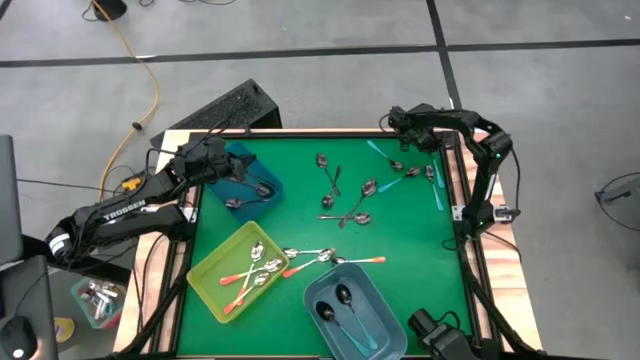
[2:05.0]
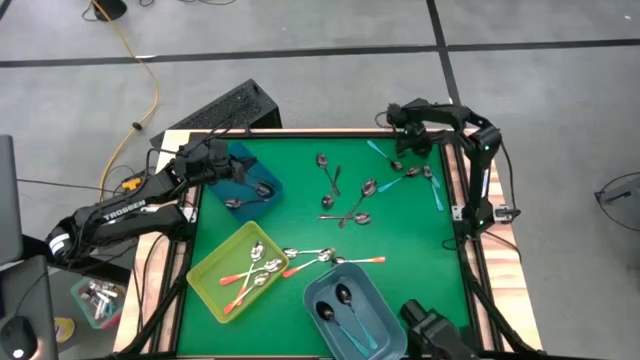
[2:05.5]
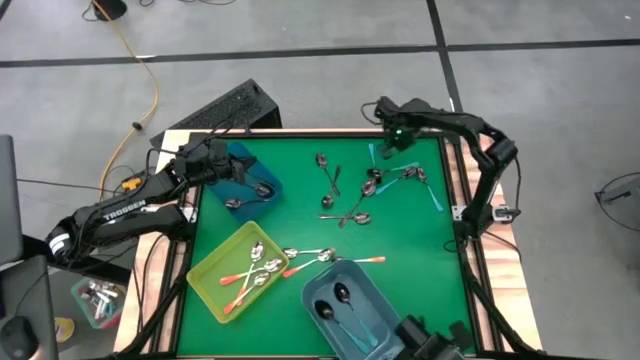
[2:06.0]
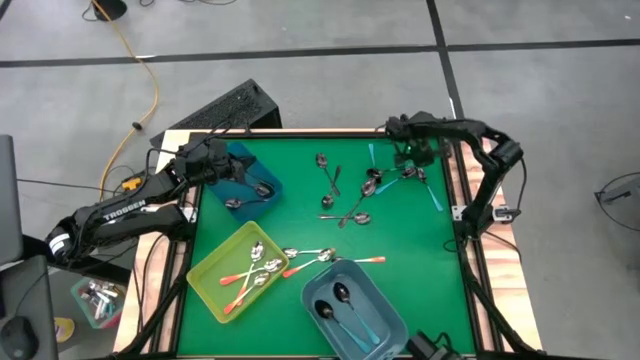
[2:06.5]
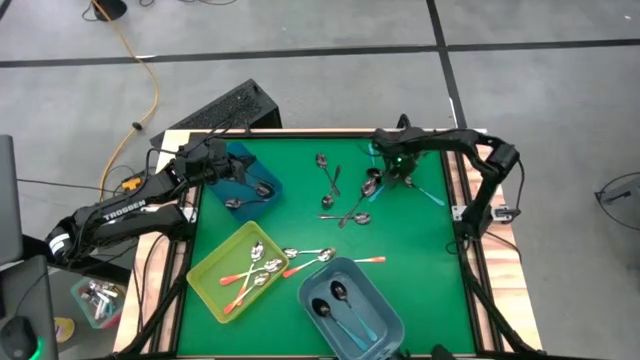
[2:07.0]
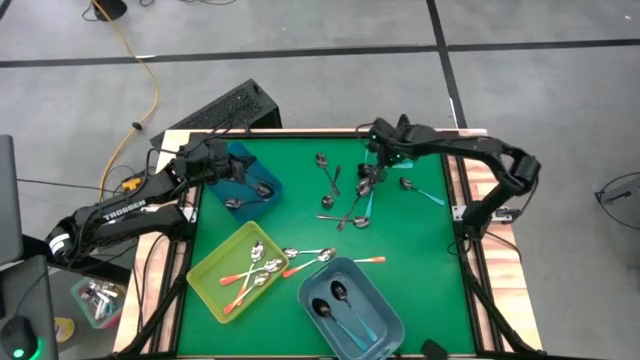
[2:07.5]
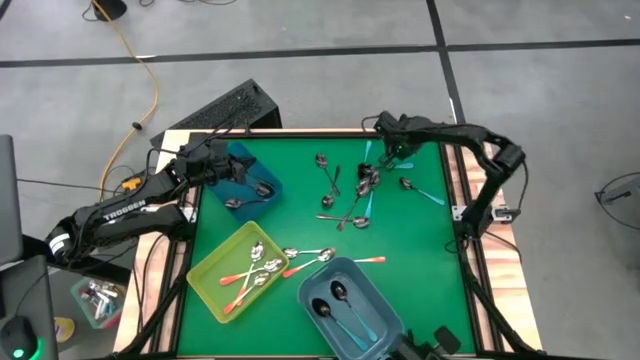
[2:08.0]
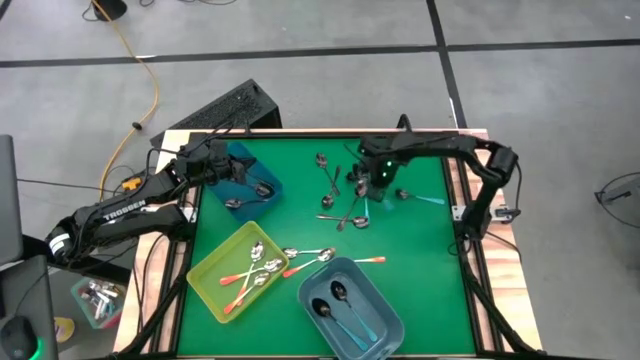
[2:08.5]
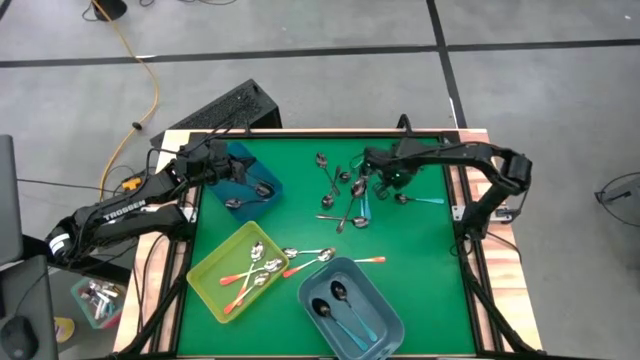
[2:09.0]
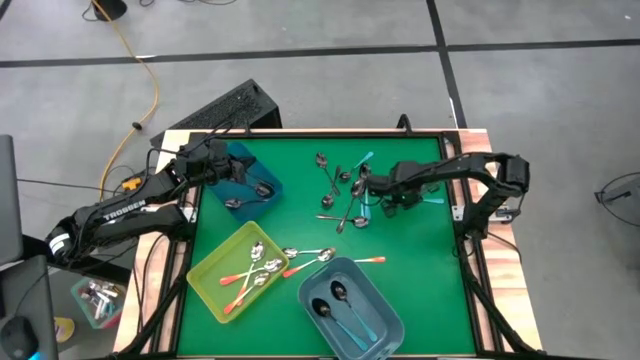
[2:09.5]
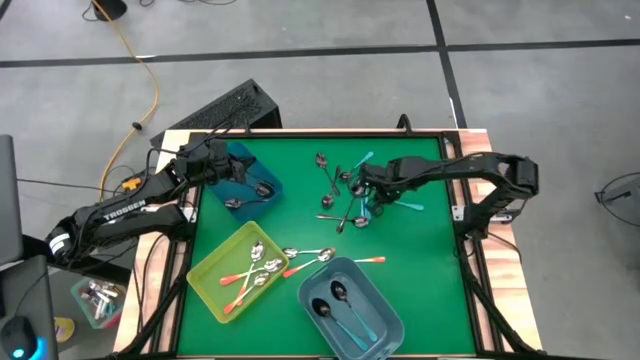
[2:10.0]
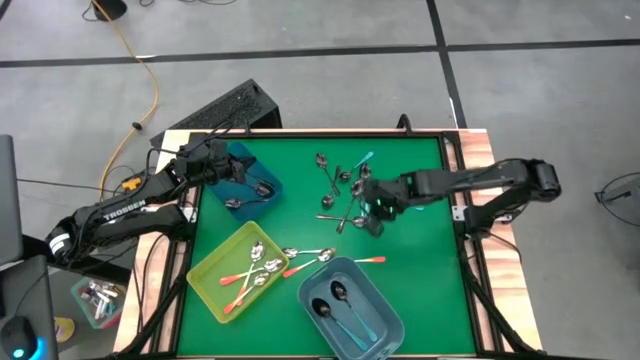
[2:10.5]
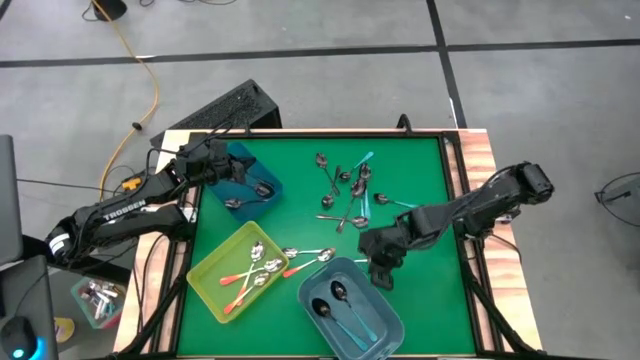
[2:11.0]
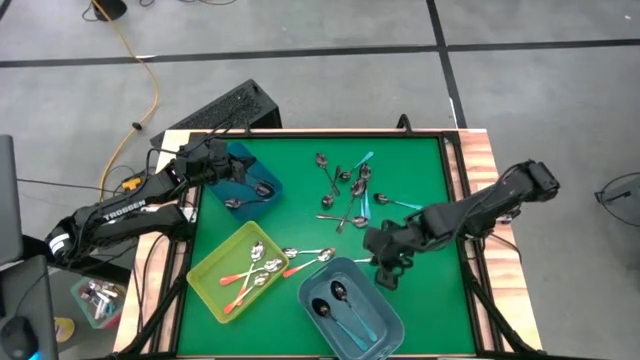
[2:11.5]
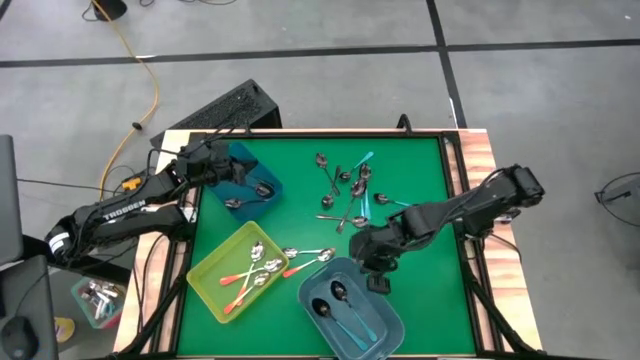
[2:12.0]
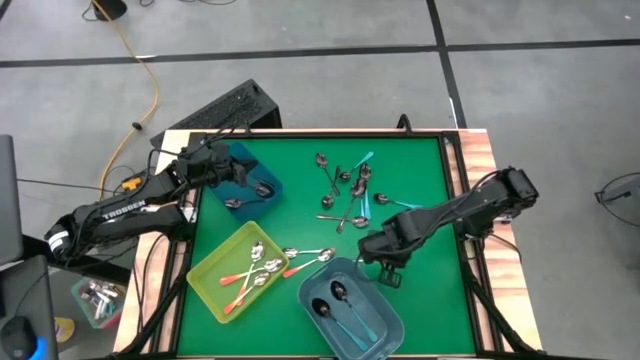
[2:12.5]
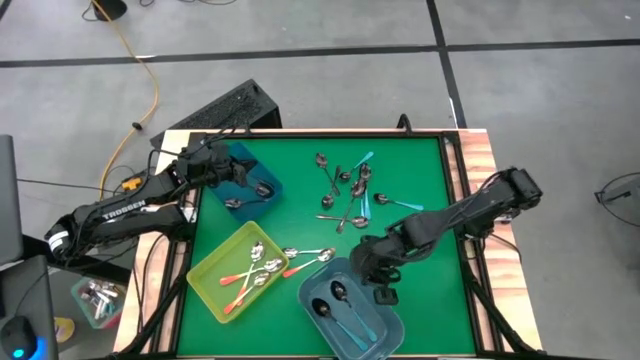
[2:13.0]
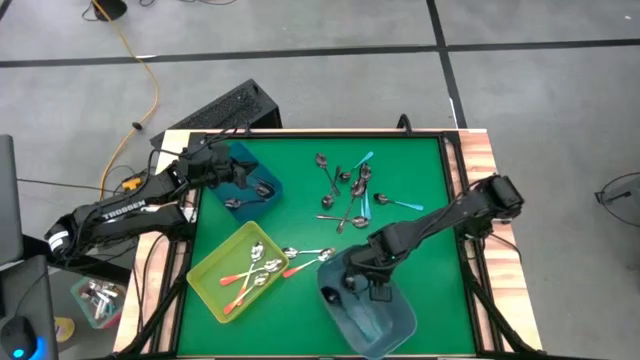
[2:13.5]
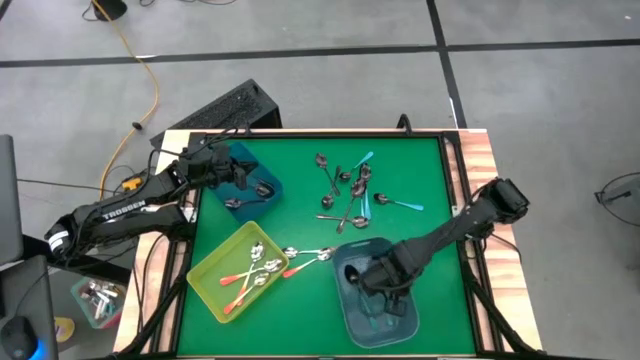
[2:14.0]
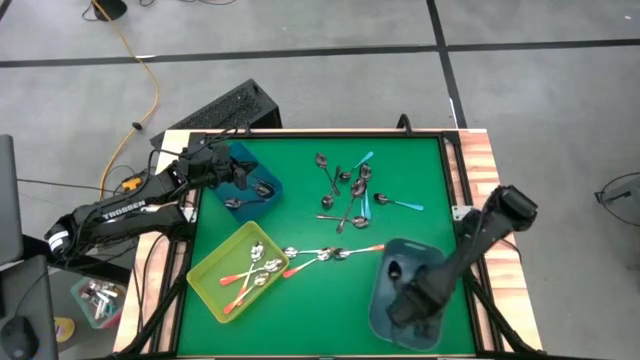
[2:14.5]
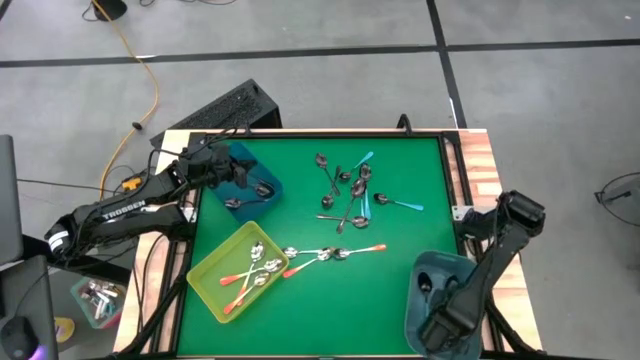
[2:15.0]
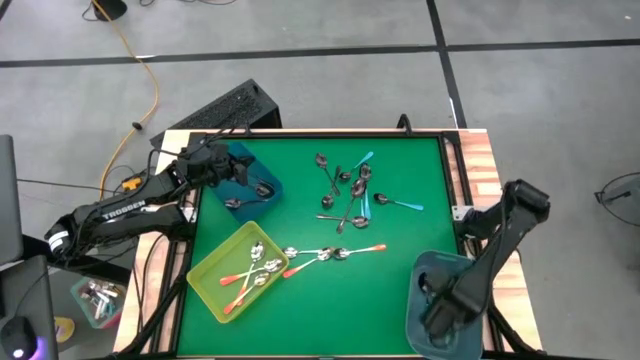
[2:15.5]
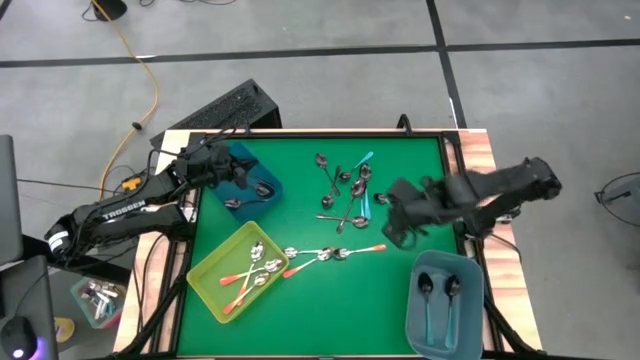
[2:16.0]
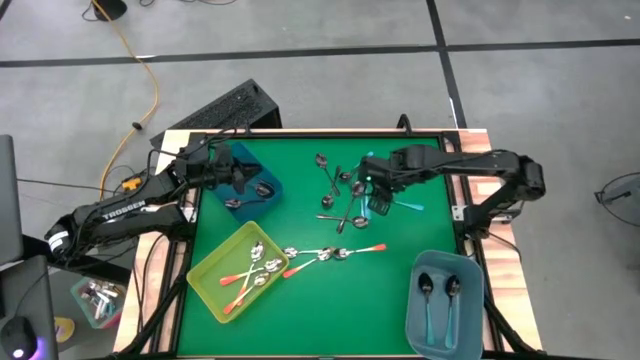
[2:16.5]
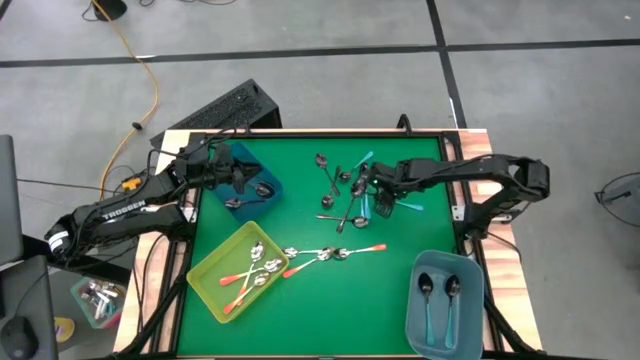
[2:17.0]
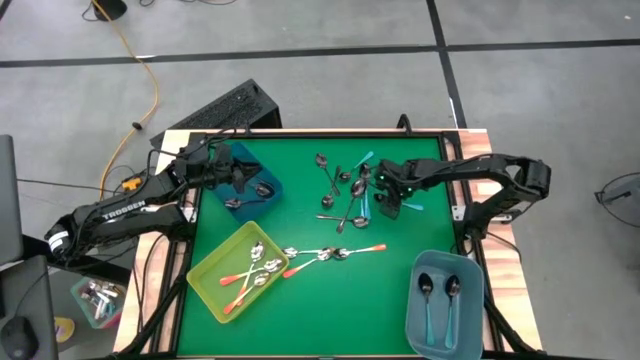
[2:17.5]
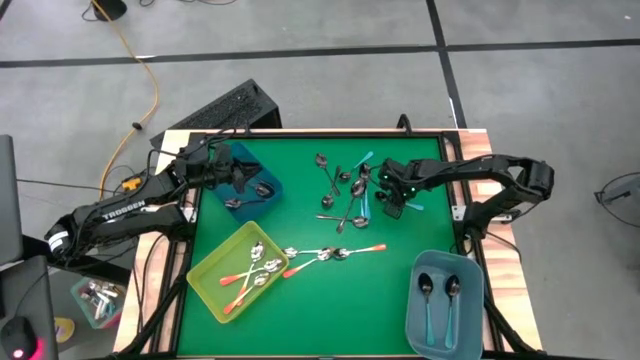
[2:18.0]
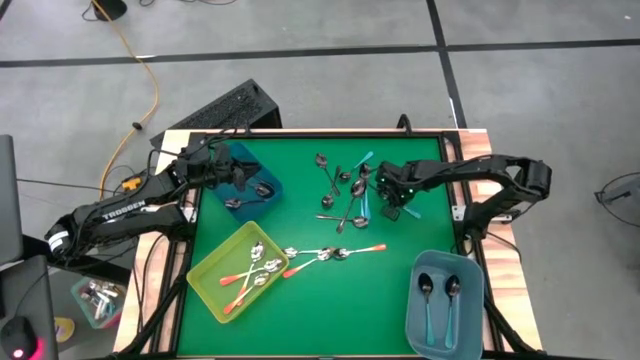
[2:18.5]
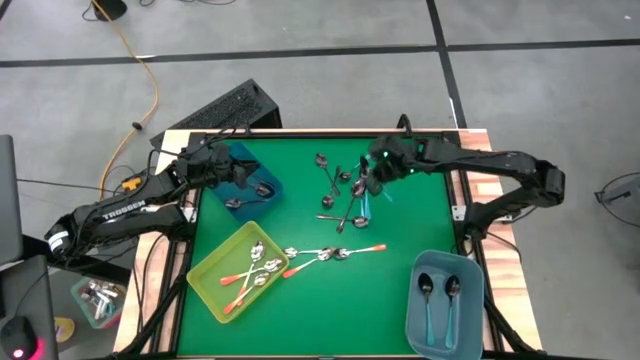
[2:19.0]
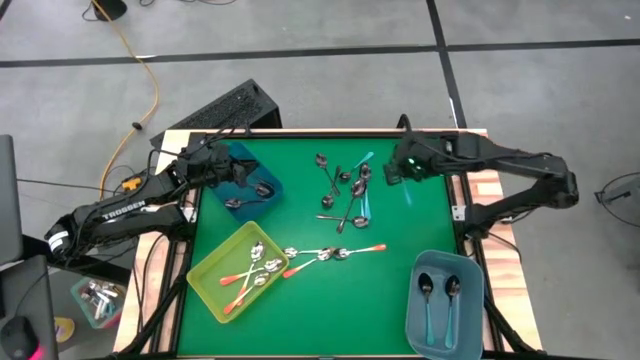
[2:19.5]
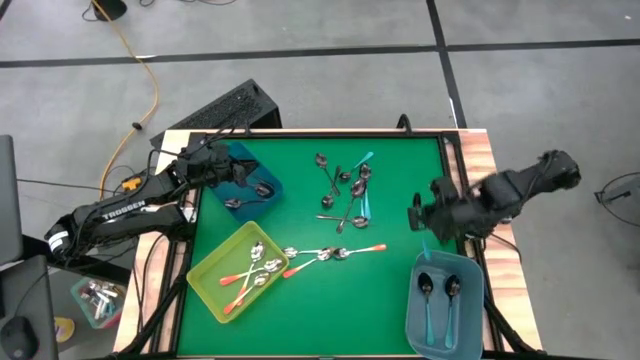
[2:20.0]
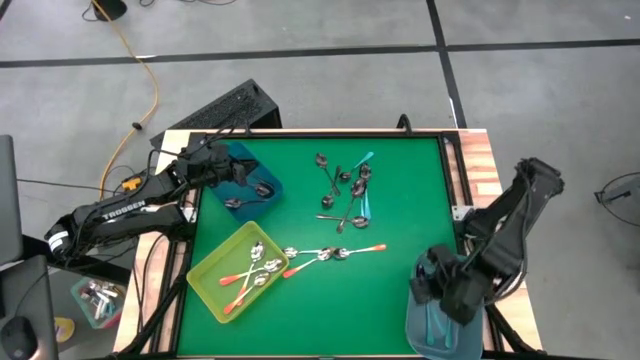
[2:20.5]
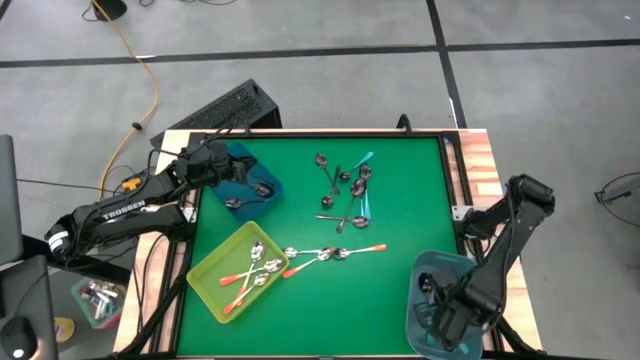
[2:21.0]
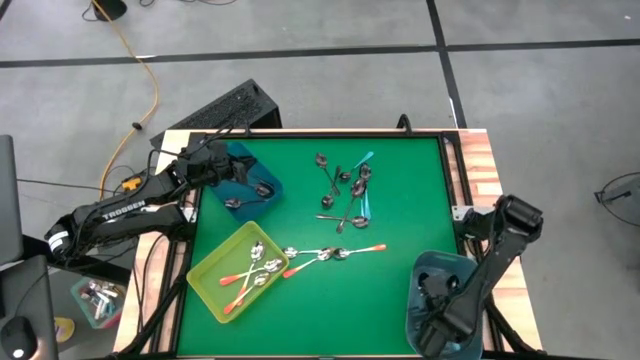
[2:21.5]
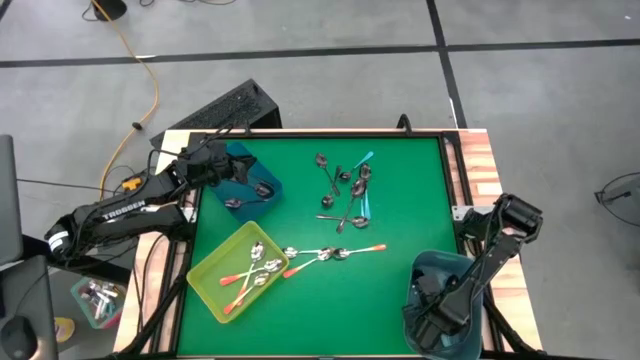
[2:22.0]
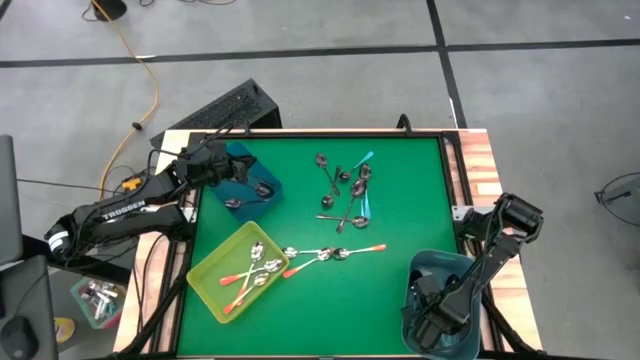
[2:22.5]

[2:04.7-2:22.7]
Task: Sort silverware by color (type)
Put the blue spoon into the blue bin

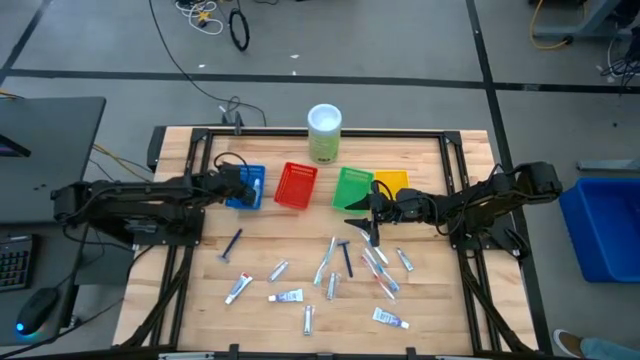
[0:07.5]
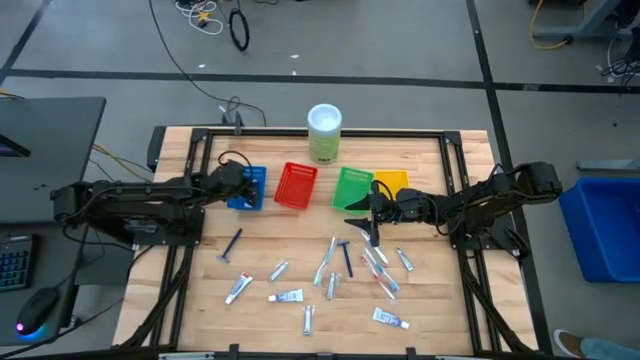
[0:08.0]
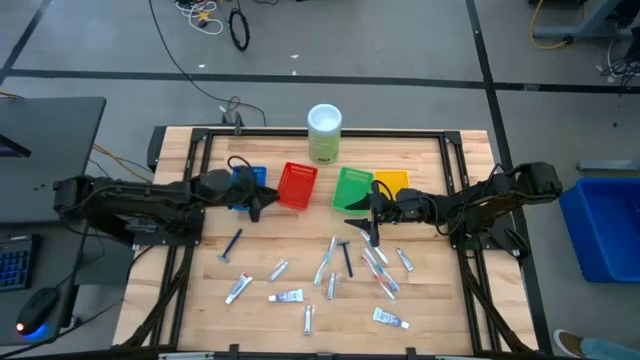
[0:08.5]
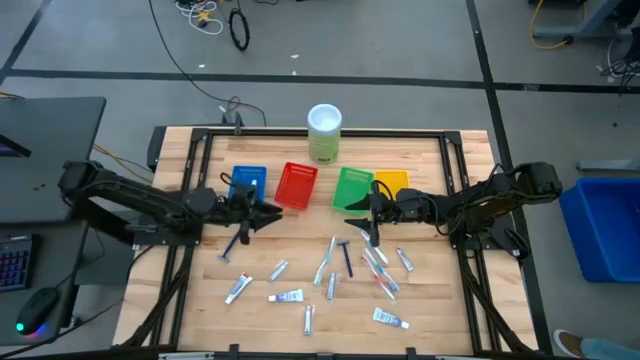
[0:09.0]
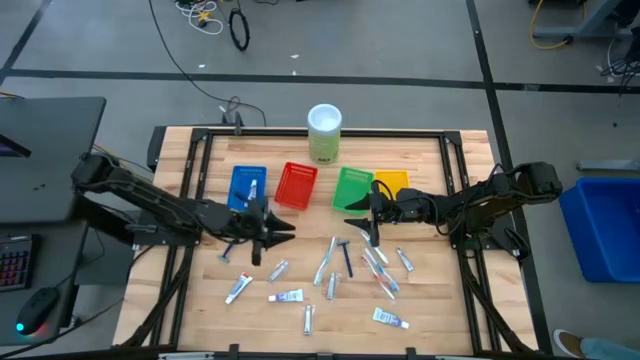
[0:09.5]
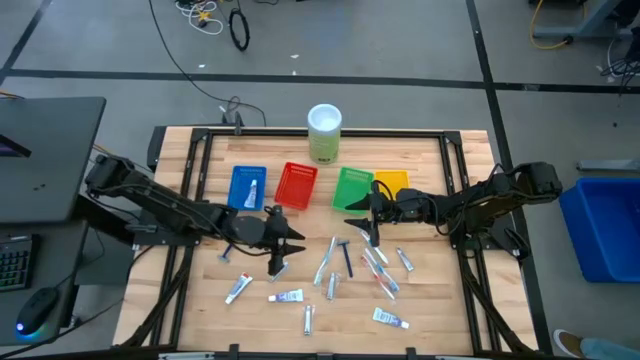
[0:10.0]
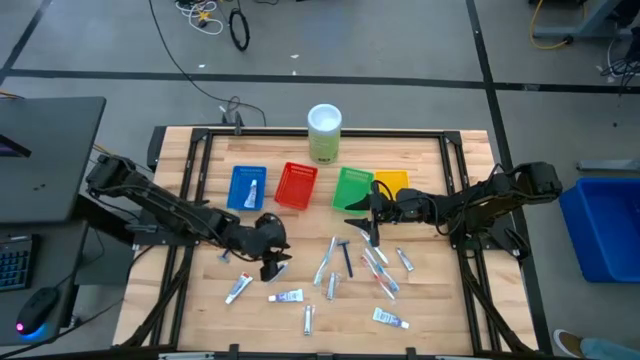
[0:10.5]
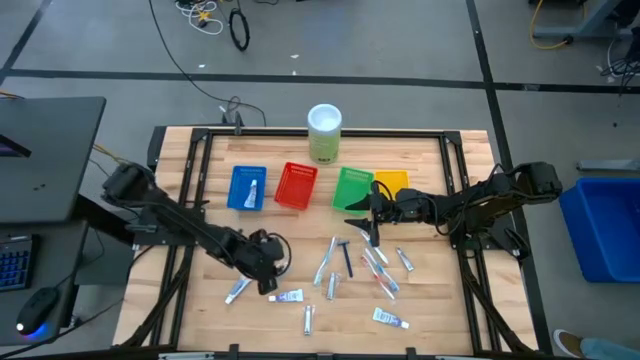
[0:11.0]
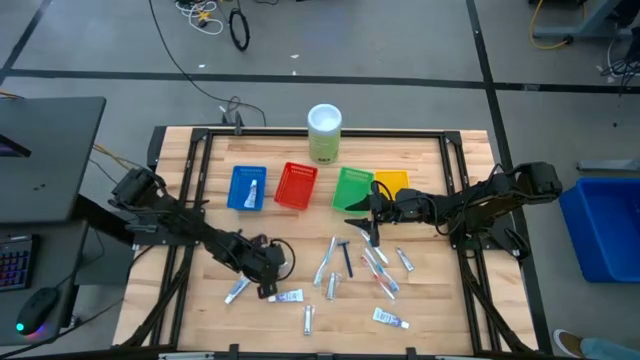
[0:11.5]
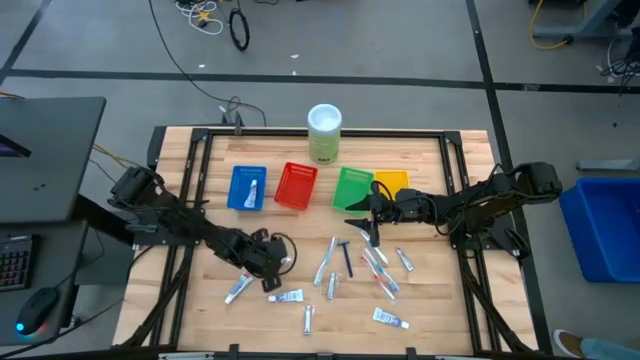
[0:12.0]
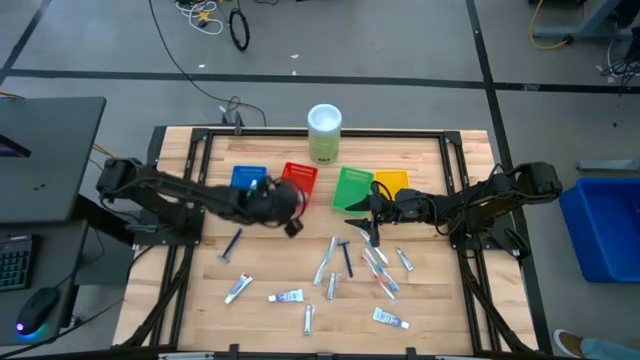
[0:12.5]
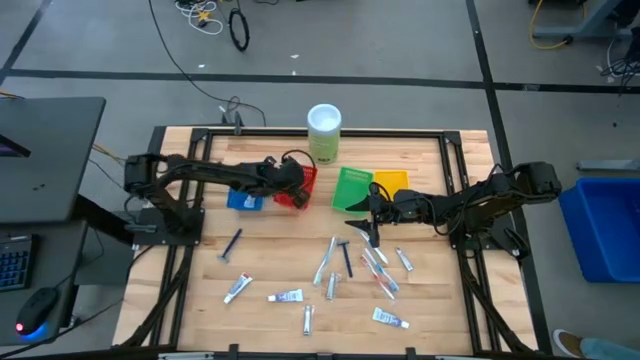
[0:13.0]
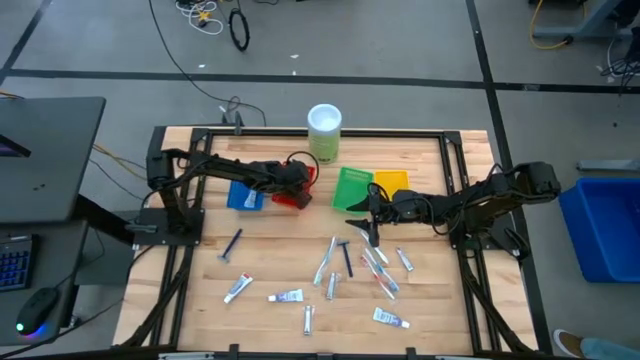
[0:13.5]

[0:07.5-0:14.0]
Task: Pick & Place Travel size toiletries
Put the silver nail cutter into the red basket
